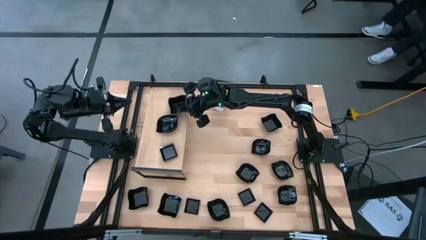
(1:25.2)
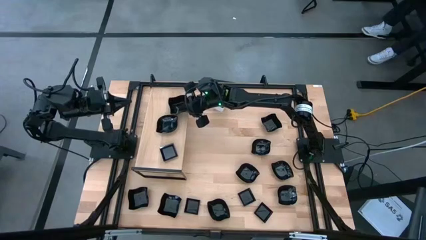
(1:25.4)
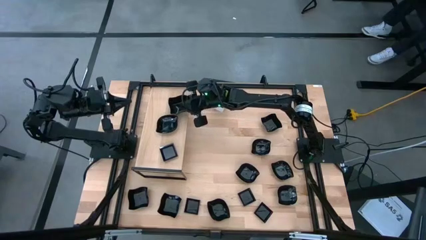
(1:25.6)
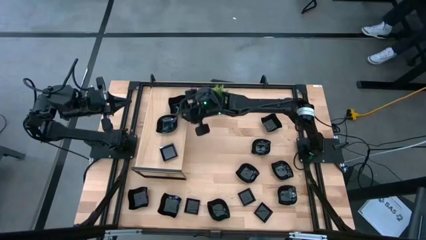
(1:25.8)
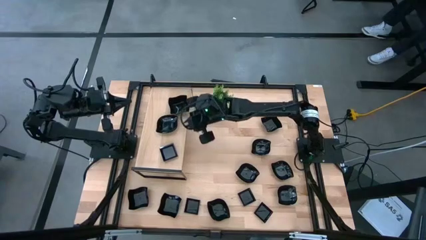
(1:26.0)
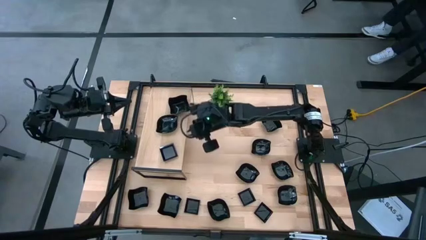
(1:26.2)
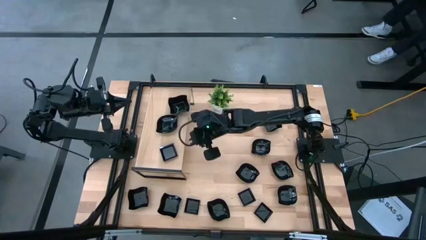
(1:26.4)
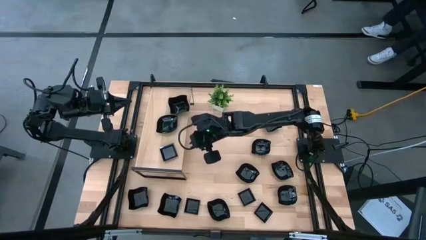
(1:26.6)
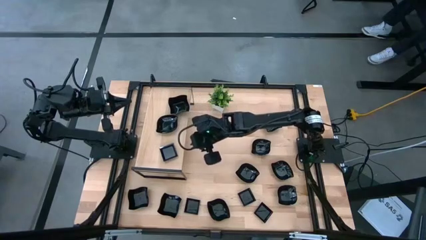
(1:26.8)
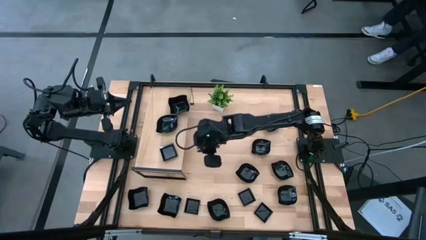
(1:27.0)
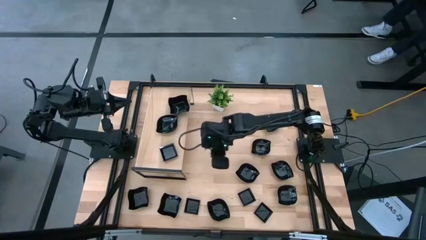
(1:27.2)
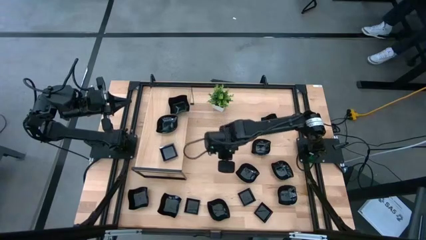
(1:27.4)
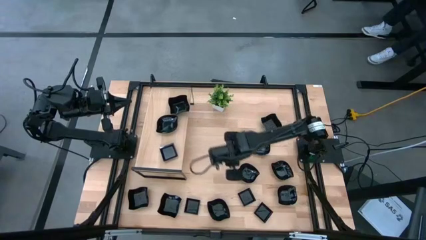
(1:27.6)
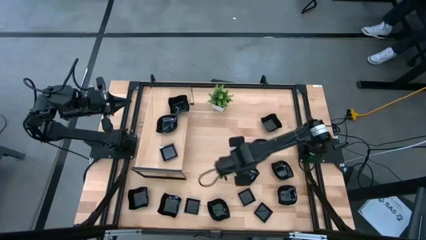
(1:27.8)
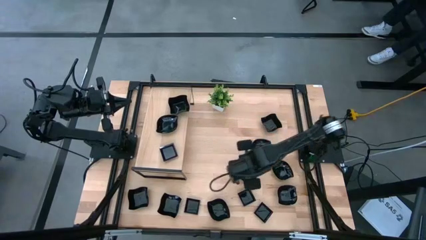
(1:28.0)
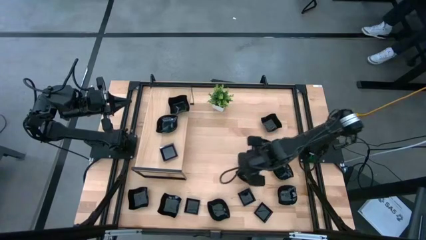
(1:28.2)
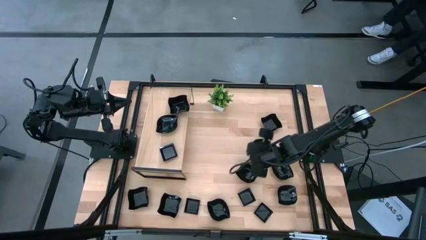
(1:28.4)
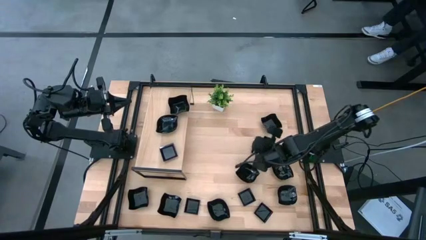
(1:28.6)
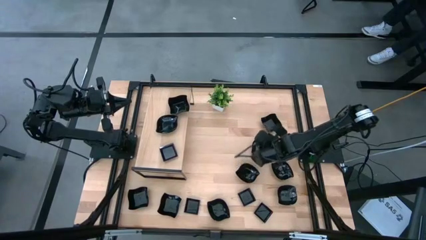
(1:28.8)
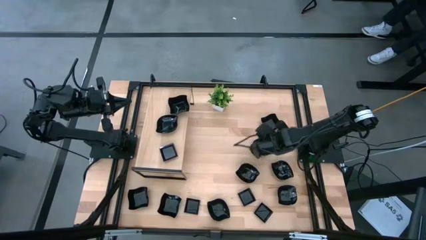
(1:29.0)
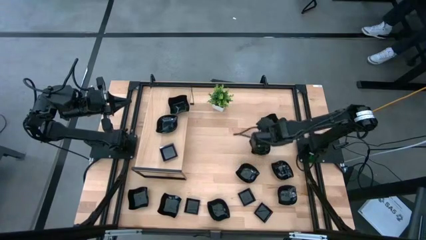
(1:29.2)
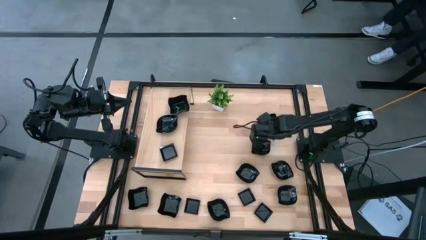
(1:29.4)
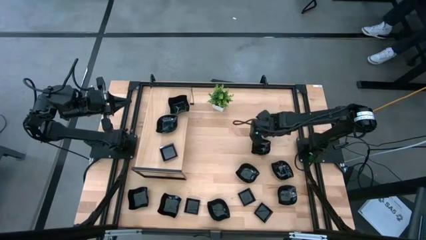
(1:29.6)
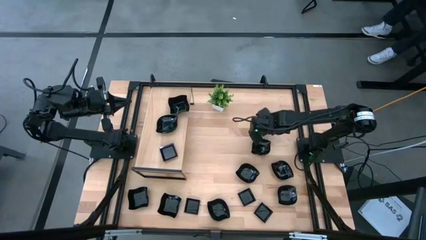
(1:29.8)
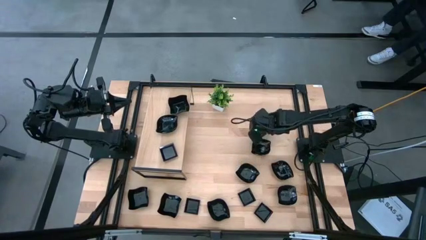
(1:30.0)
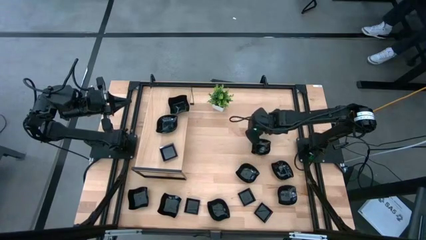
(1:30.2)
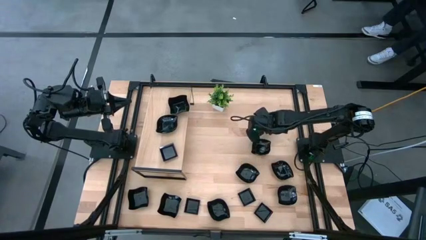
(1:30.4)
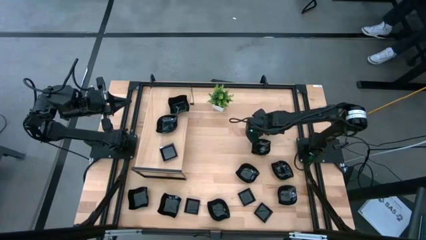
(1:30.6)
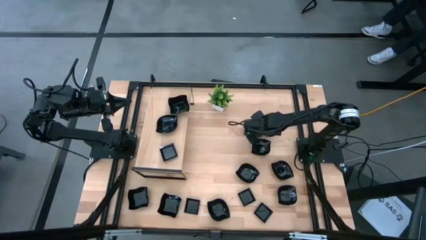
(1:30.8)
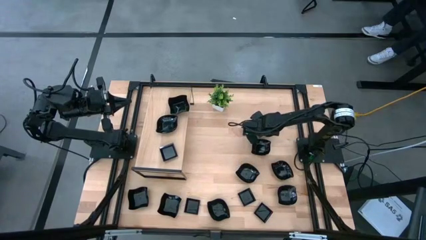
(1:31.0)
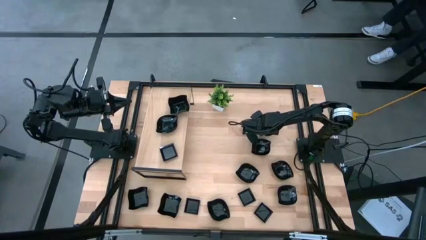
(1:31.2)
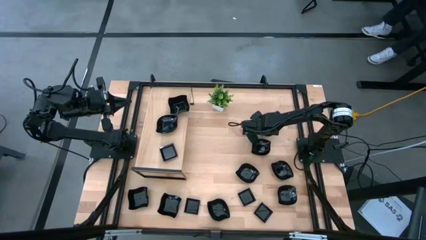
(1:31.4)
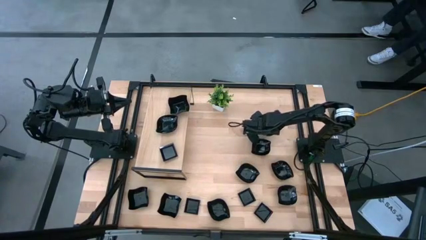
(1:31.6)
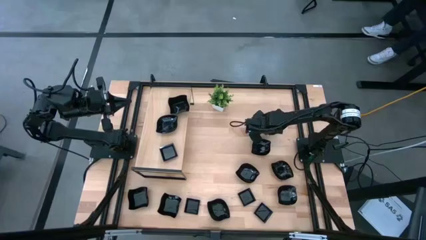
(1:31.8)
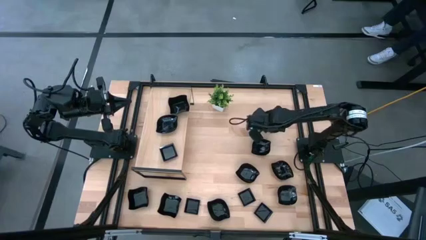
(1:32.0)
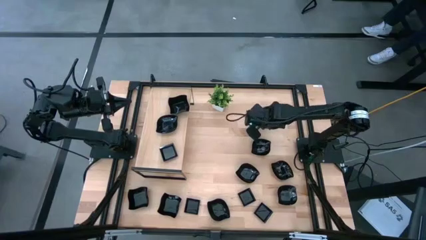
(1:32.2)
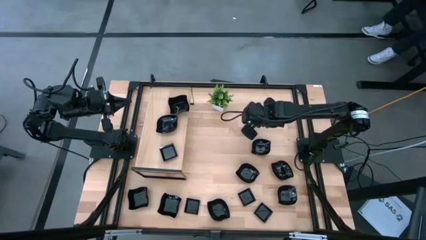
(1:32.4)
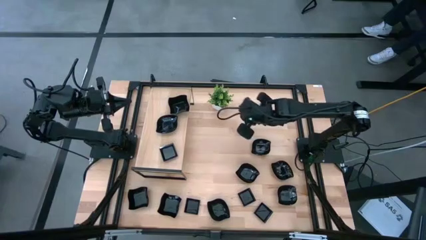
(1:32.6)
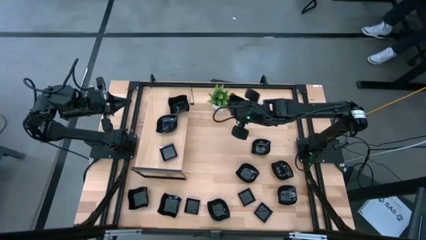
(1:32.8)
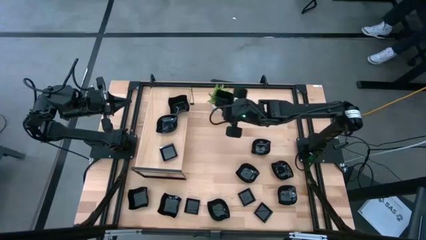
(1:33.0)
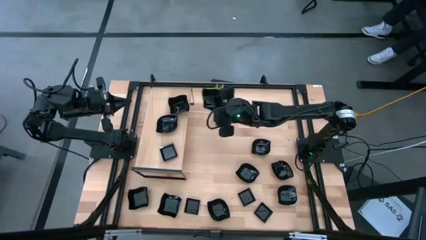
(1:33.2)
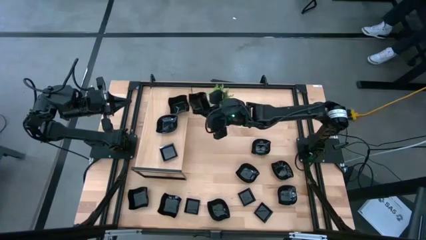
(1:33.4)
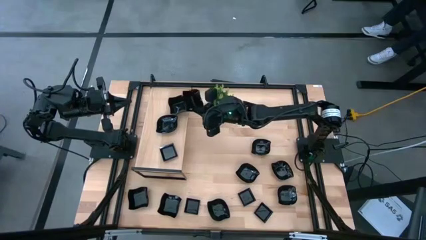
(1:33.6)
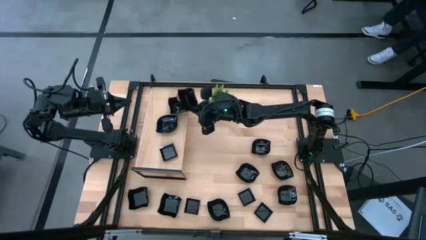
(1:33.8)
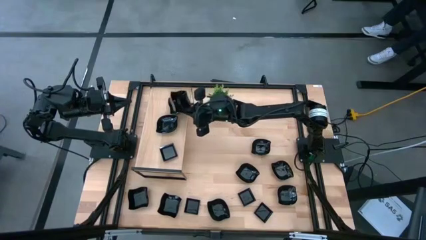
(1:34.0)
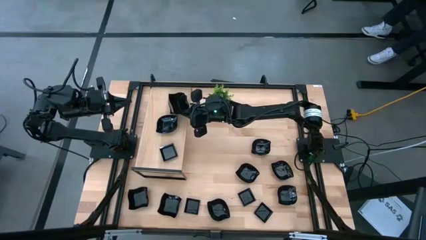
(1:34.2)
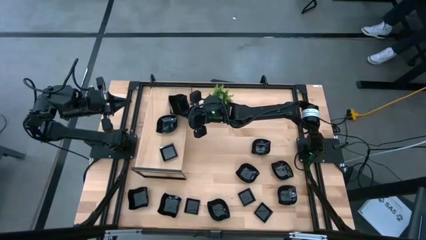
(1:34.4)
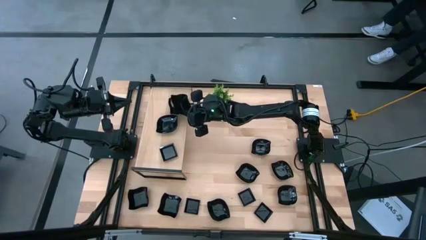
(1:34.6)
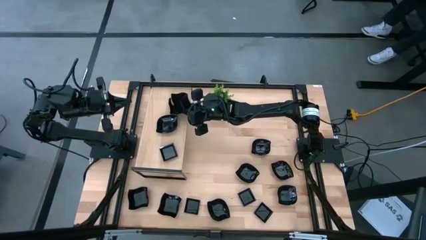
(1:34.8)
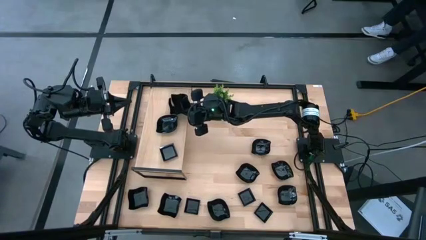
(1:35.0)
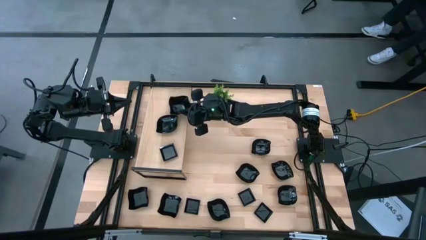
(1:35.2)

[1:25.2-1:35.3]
Task: Pick & Place Mini shaped plates
Stack the black distorted square plate on top of the black distorted square plate on the shelf

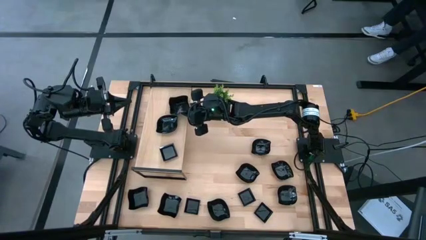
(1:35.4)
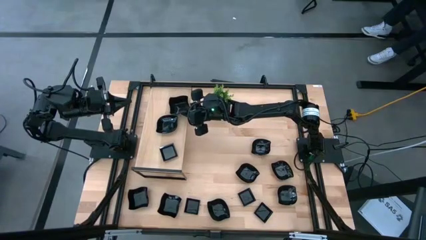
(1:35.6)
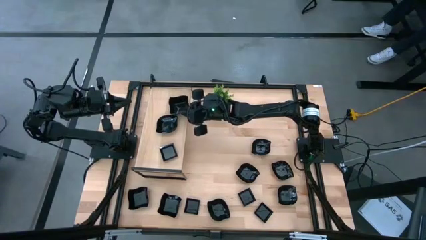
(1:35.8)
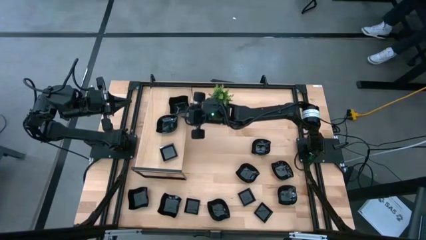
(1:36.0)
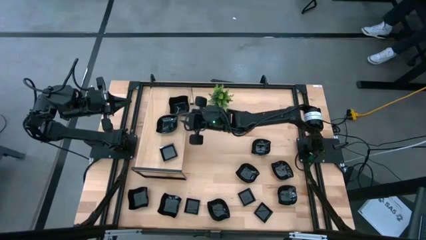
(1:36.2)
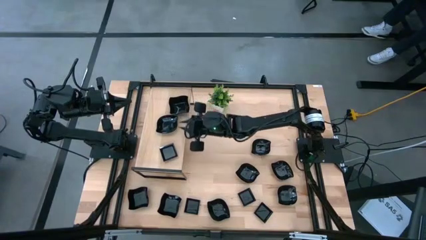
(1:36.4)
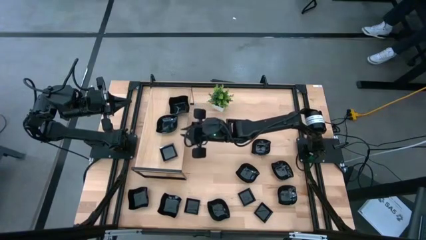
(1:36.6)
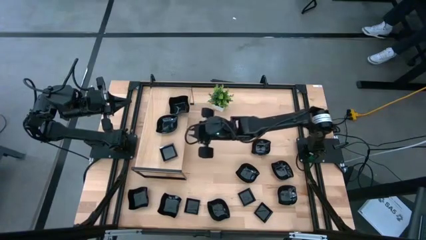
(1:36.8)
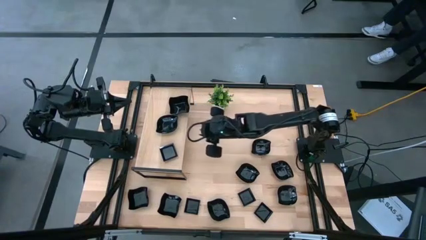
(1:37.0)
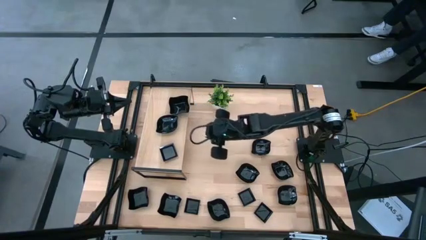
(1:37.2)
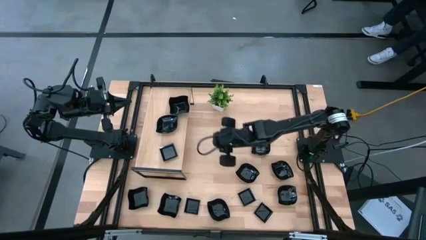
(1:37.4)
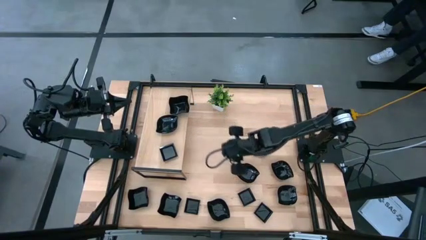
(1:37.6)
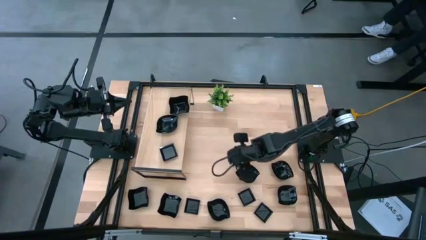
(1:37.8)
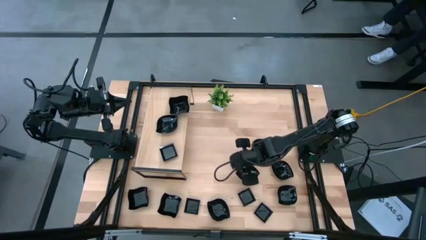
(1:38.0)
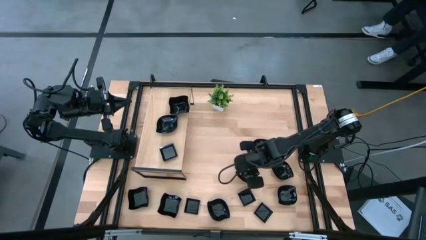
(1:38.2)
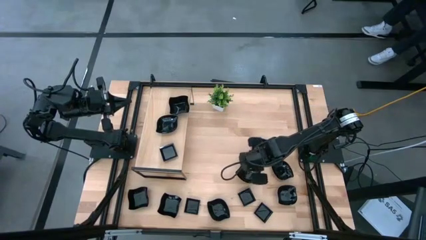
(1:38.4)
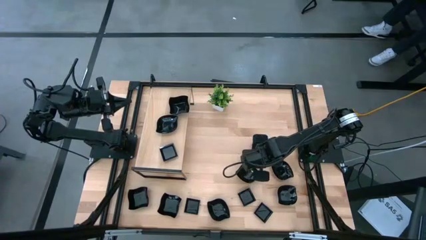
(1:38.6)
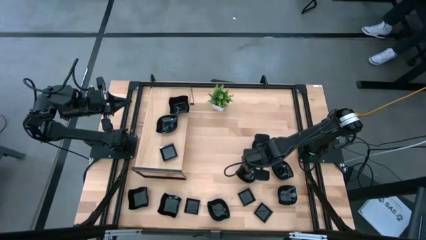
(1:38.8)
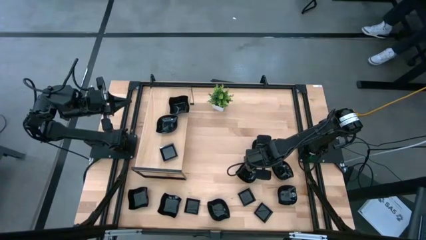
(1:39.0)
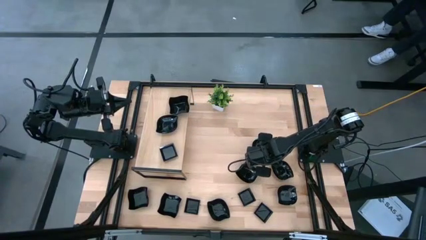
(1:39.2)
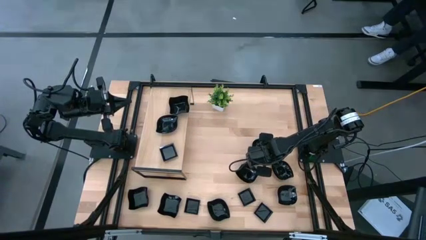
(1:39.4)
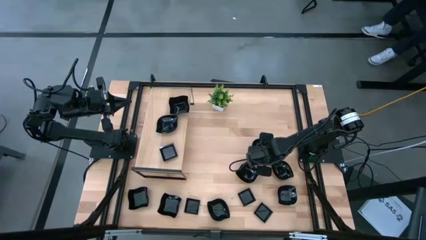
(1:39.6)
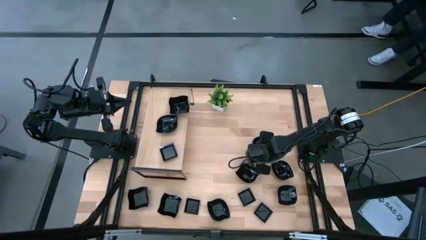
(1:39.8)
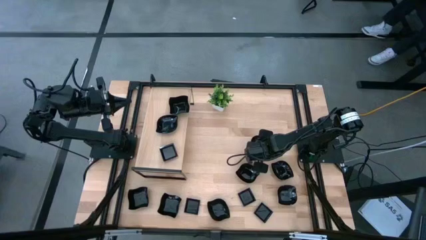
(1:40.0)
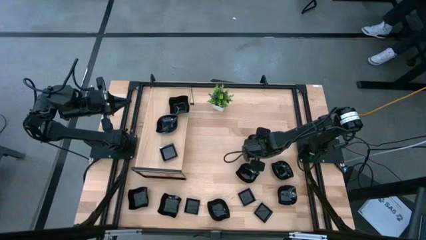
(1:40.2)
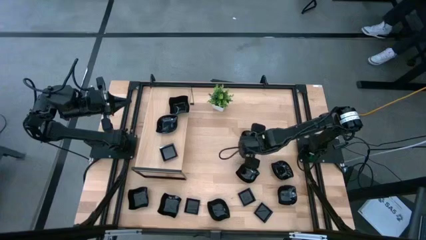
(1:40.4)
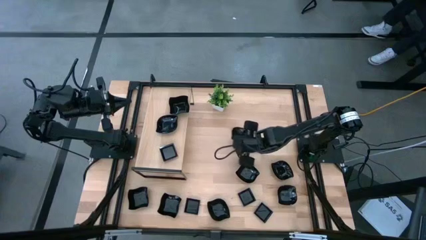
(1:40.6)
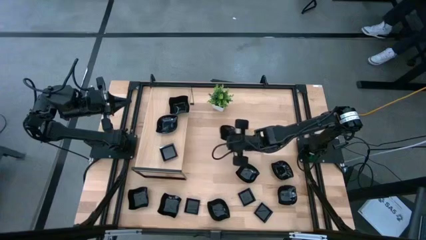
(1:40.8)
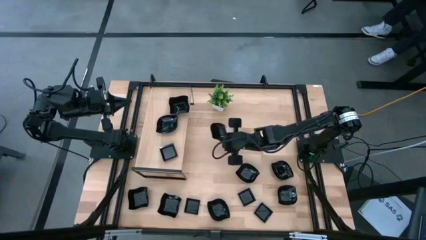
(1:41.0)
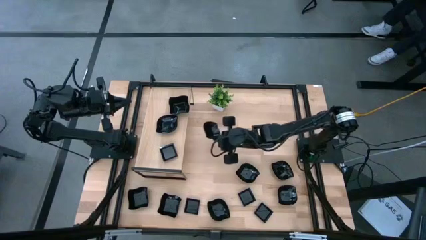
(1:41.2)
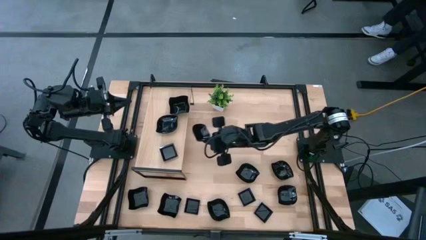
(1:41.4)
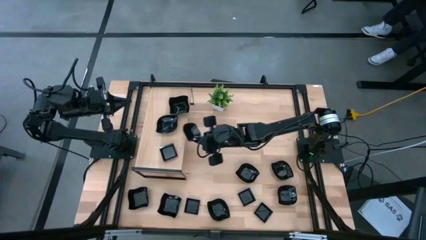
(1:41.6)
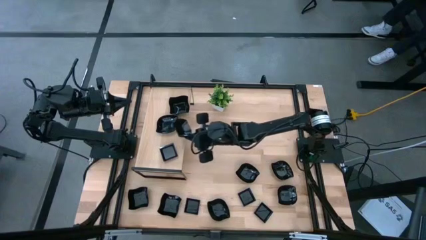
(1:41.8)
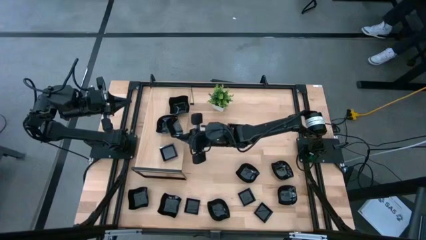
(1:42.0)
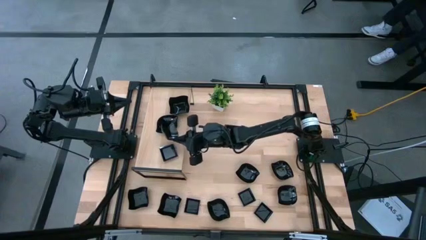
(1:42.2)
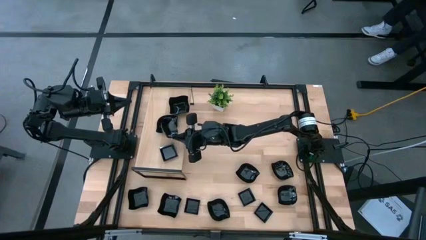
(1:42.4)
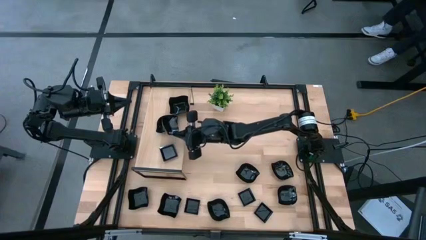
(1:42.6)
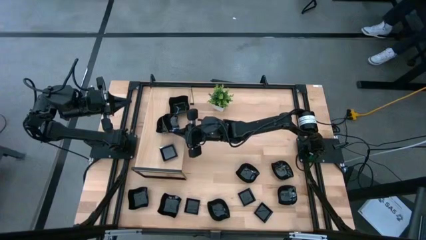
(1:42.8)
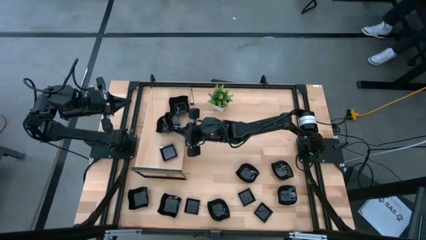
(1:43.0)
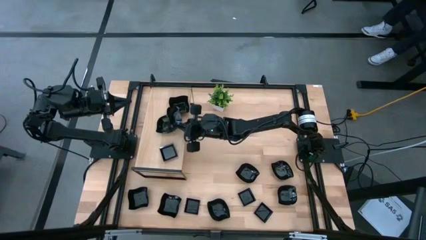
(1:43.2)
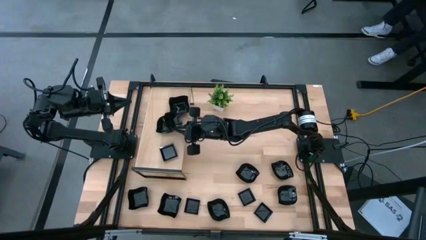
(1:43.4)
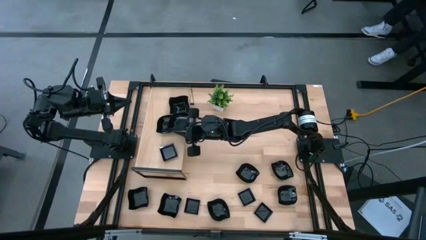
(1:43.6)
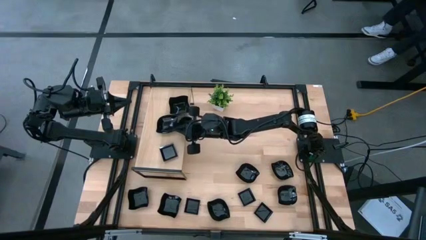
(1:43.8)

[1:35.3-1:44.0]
Stack the black leaf shape bowl on top of the black leaf shape bowl on the shelf
